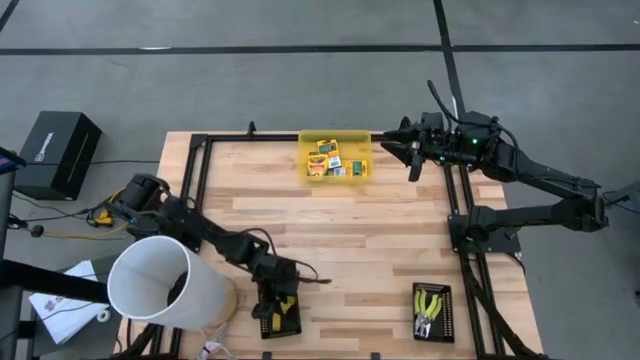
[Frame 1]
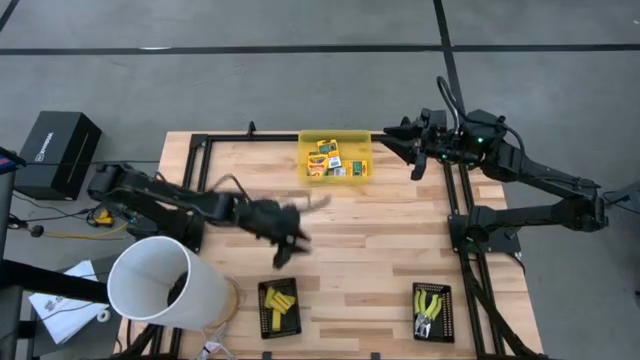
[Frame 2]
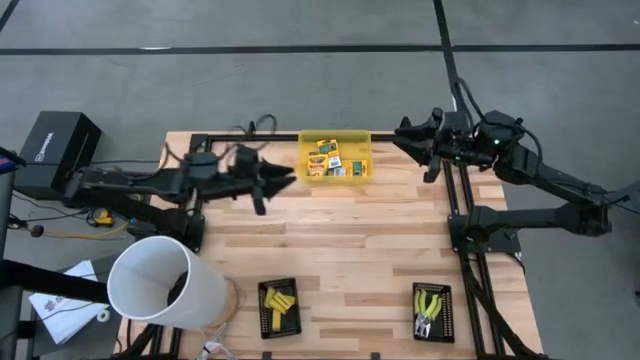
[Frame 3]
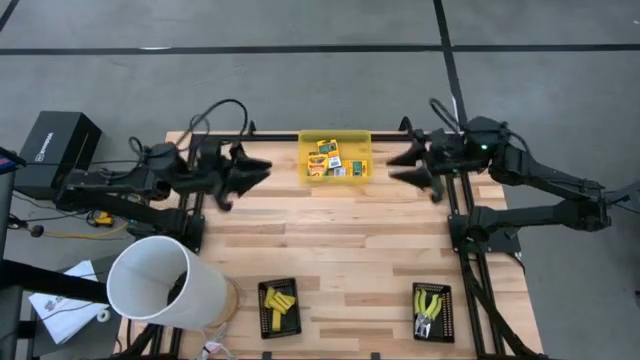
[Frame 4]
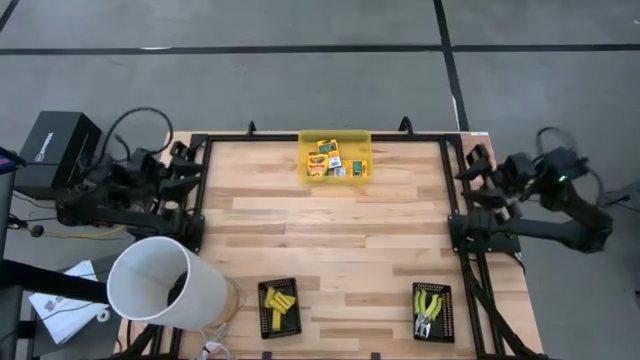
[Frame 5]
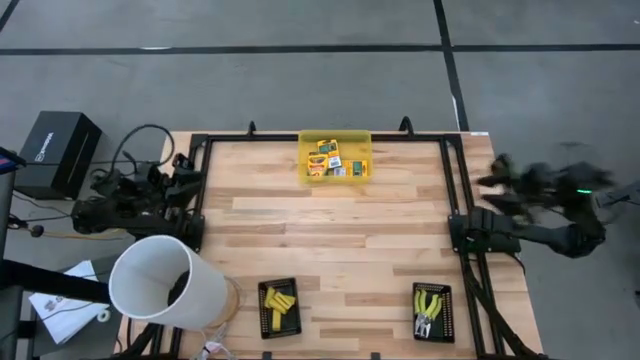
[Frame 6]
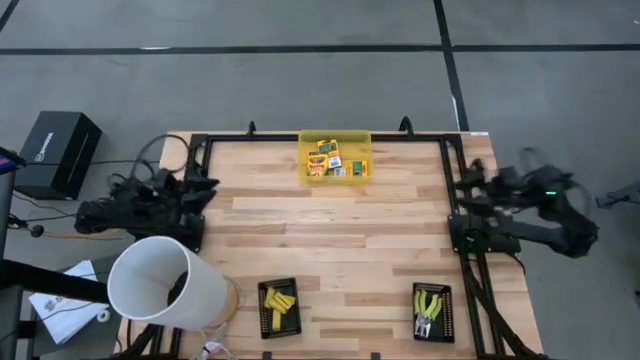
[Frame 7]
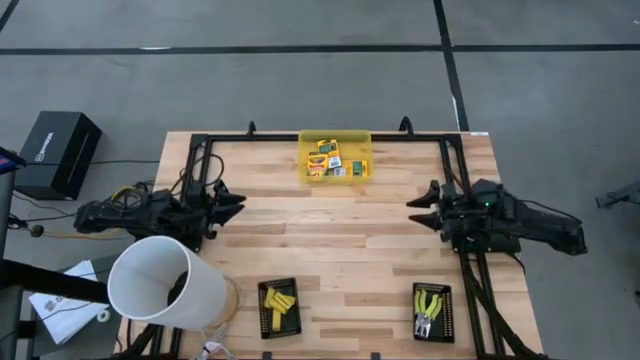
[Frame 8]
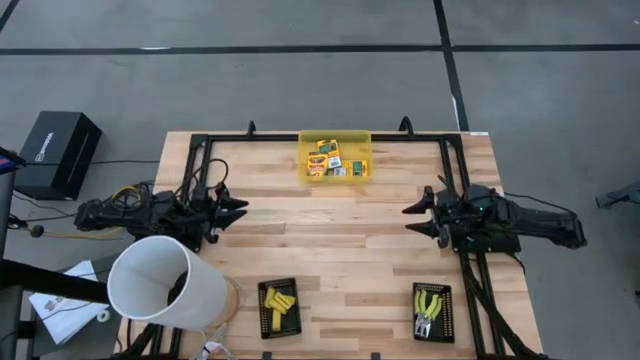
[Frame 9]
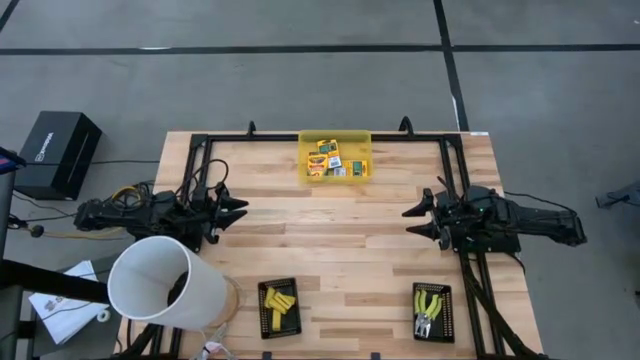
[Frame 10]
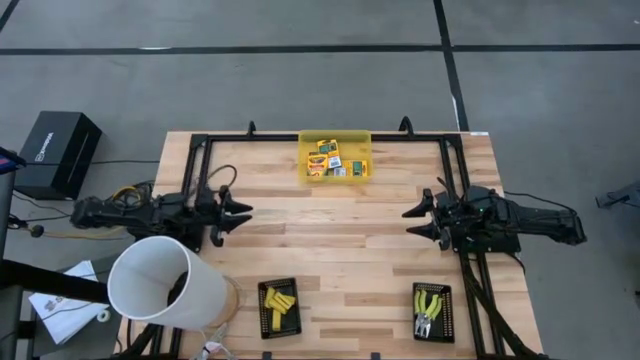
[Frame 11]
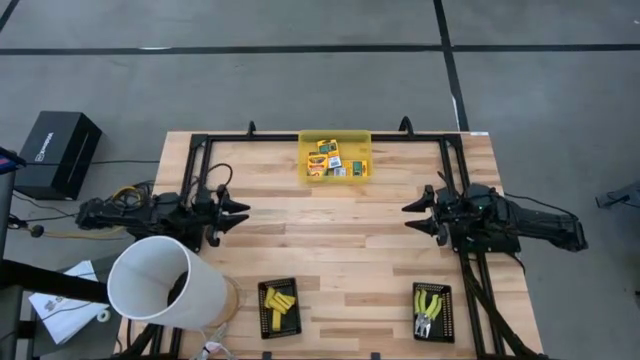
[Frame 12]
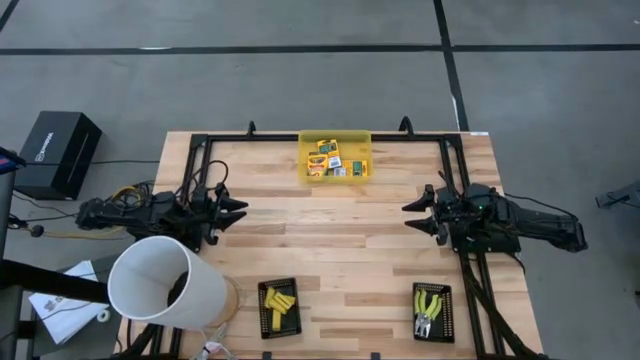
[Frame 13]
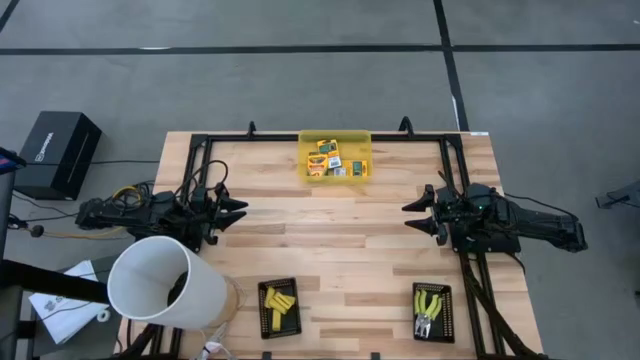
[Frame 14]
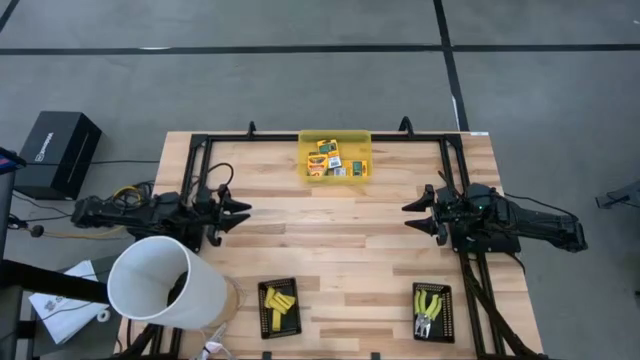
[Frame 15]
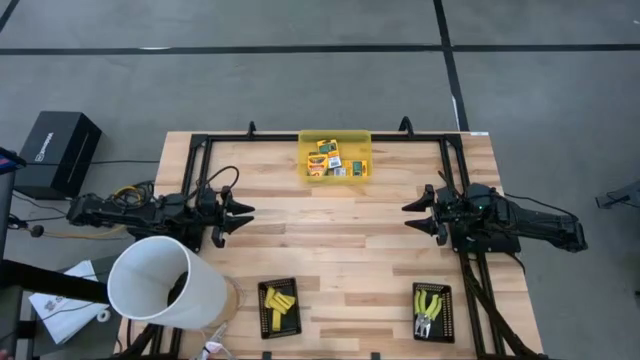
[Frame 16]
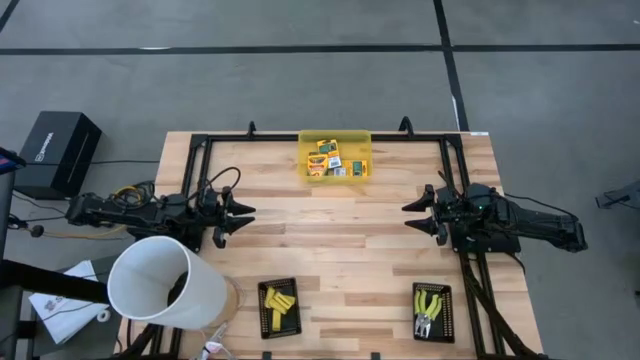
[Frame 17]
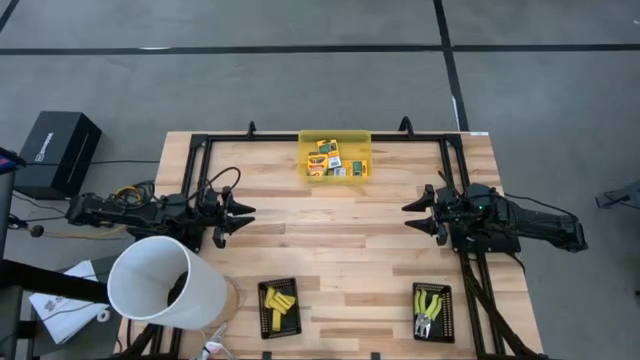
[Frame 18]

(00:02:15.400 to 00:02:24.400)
Task: Pick & Place School Supplies
Return to Home Position

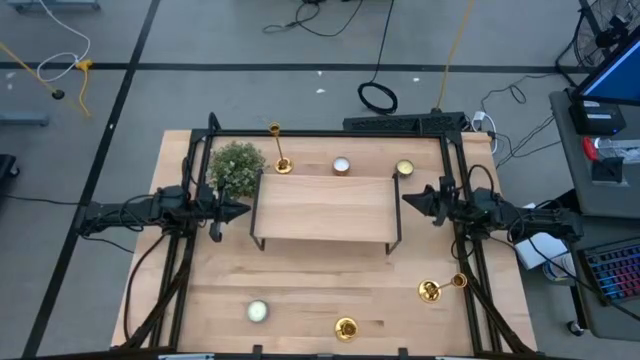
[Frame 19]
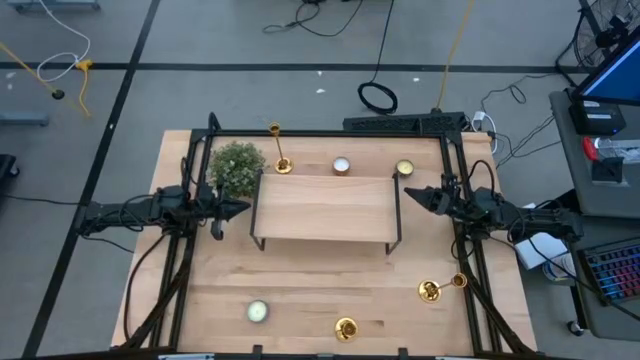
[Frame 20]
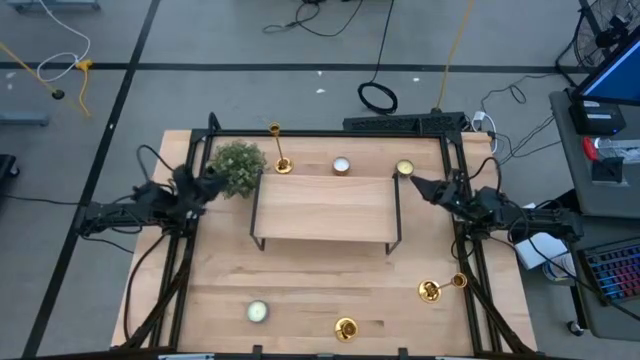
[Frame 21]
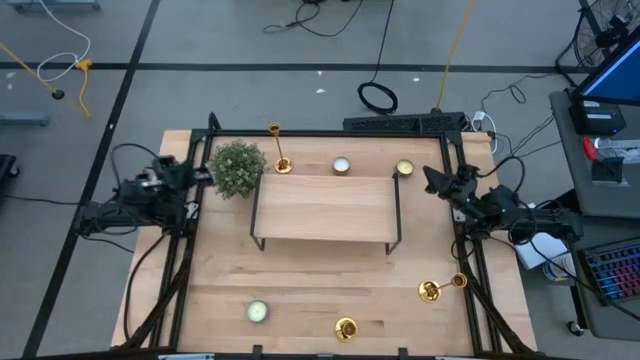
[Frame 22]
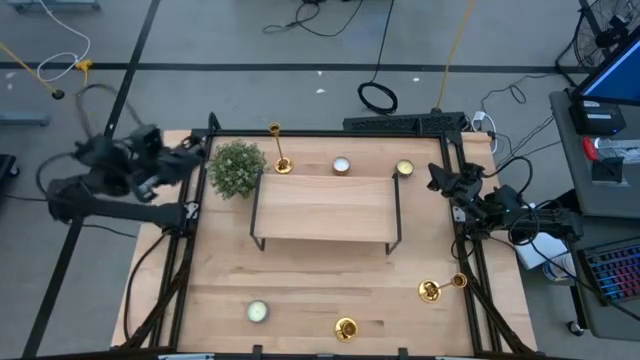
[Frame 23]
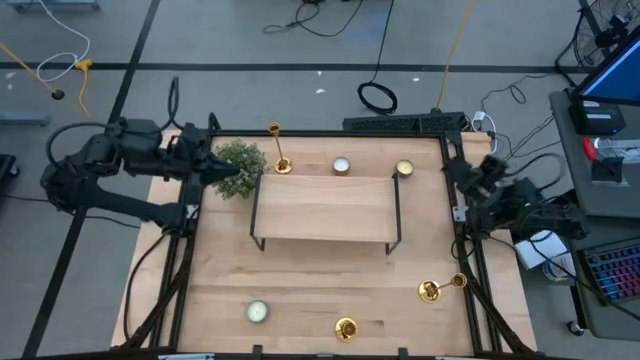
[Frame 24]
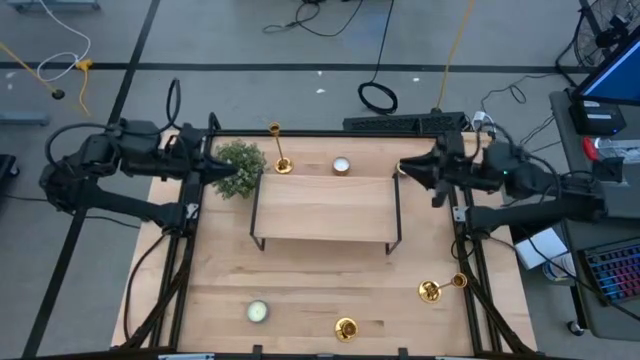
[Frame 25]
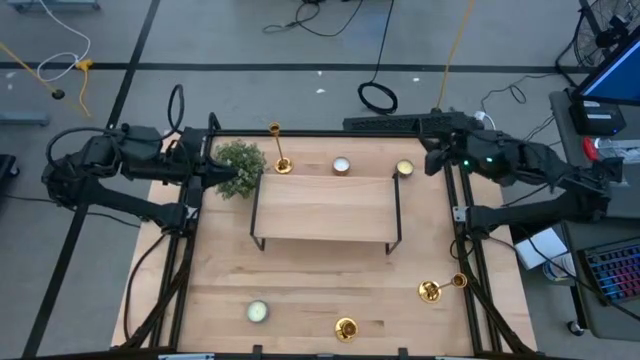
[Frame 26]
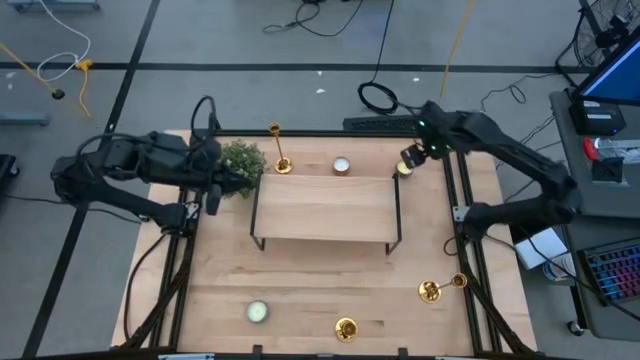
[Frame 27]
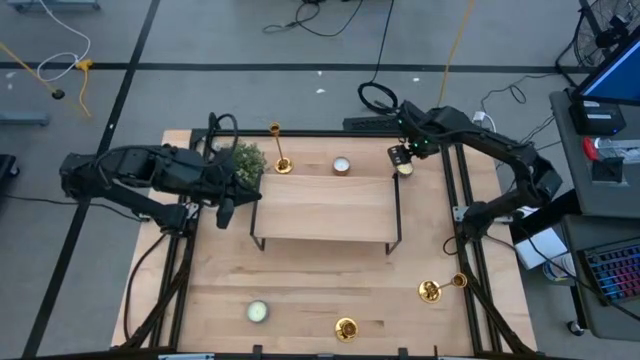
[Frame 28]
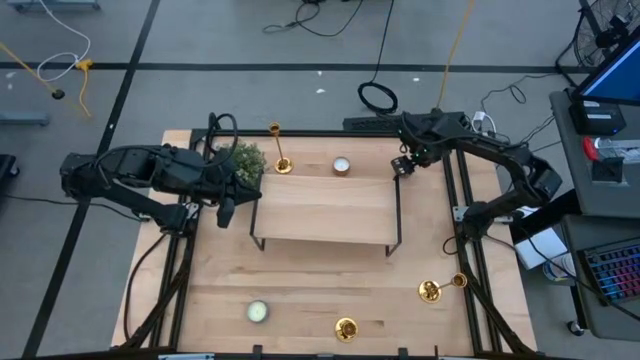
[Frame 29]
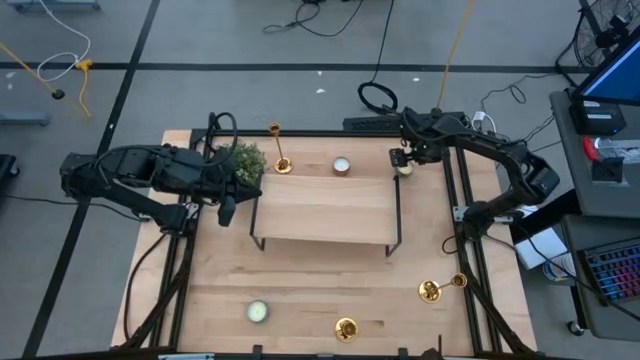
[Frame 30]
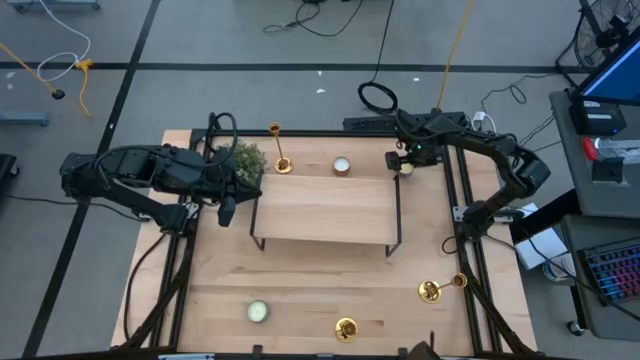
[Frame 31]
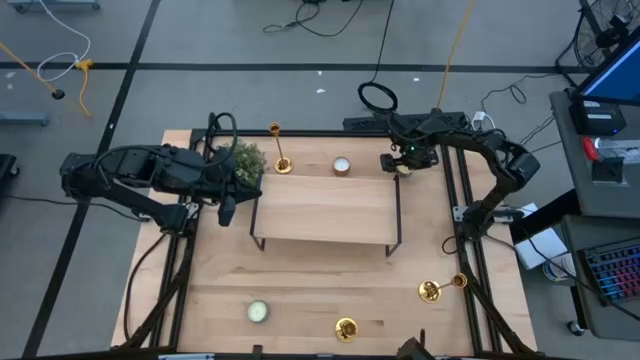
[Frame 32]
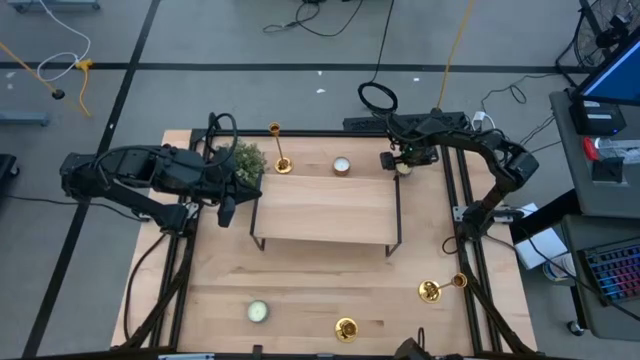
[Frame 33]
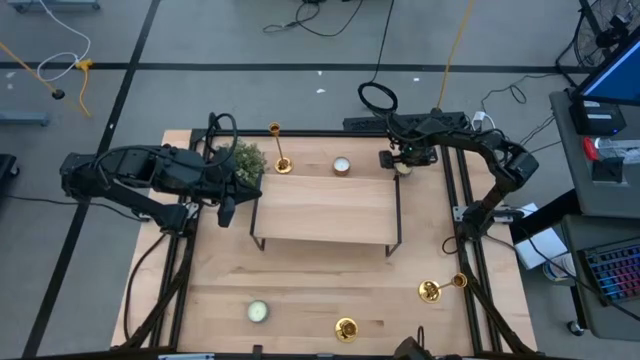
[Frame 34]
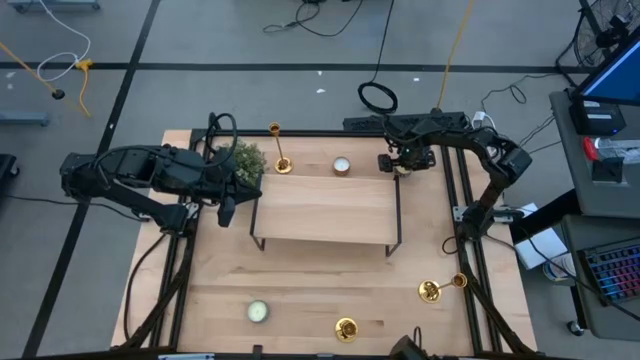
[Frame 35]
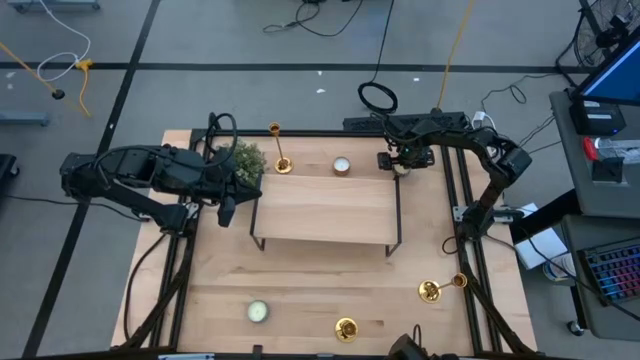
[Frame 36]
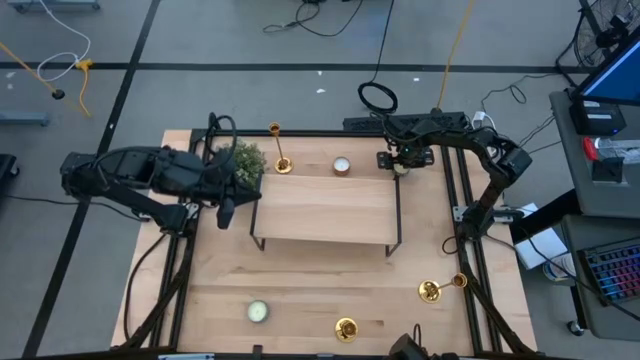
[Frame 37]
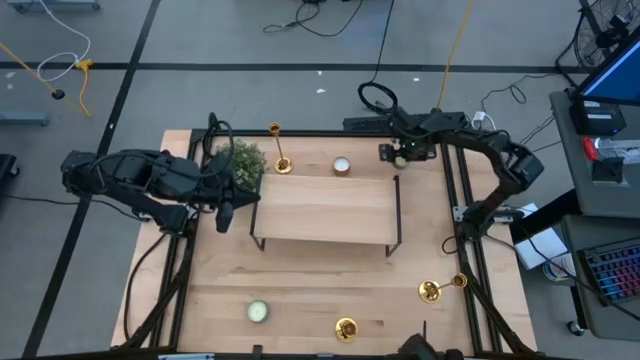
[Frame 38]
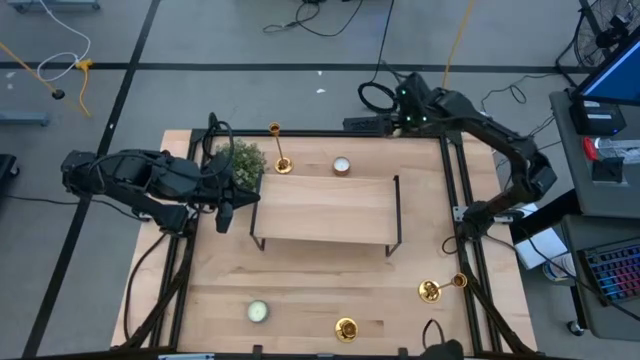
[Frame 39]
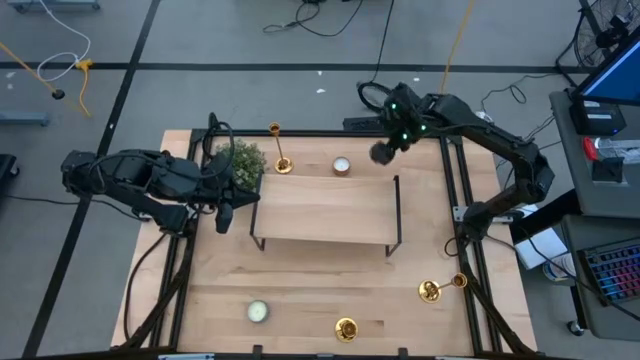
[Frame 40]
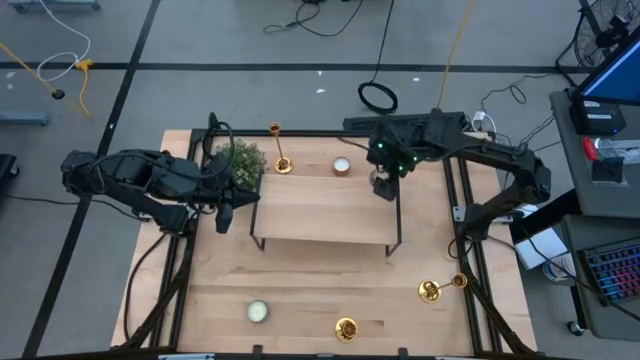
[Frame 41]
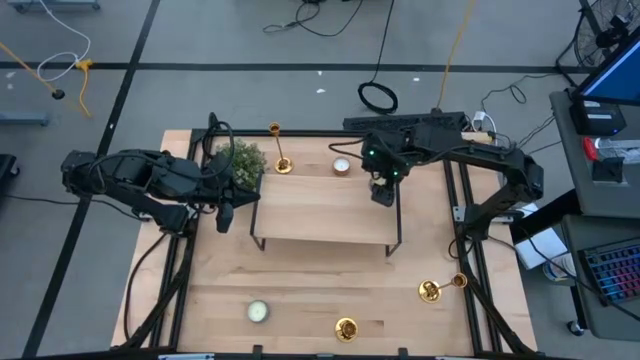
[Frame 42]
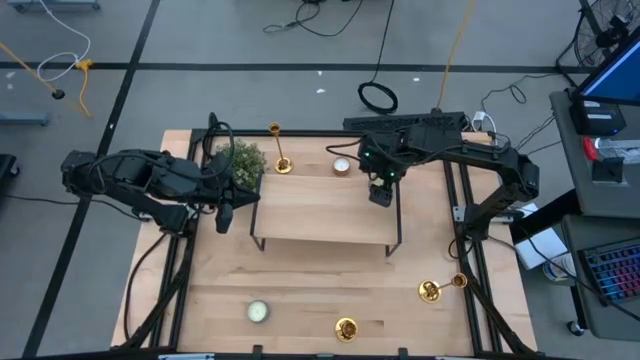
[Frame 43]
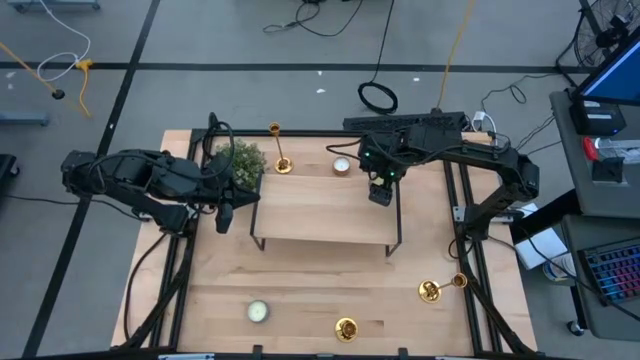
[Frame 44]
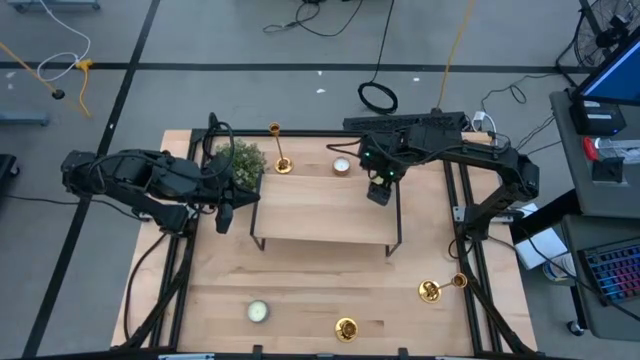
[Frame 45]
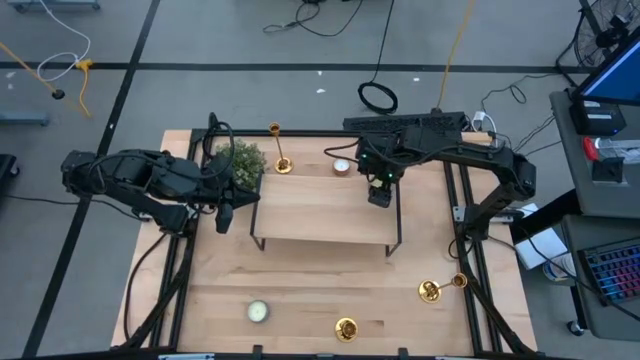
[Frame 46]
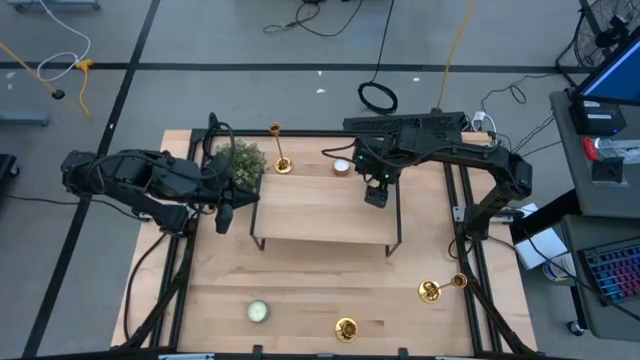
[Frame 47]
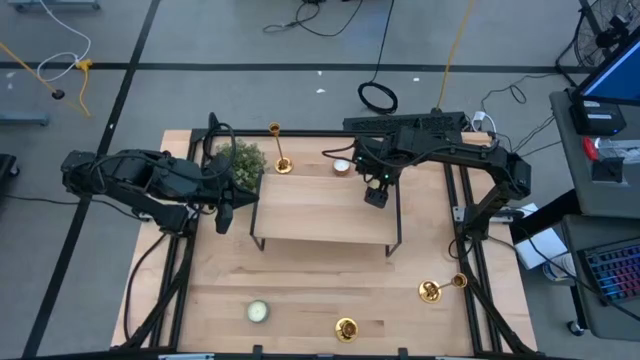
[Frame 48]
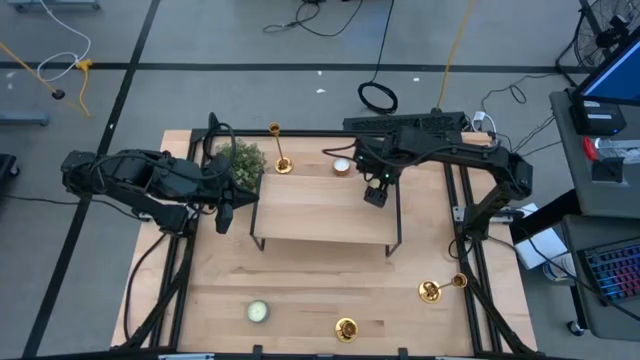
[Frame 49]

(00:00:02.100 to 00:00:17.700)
Task: Pick & Place candle stick holders
Put the top right scented candle on the shelf
